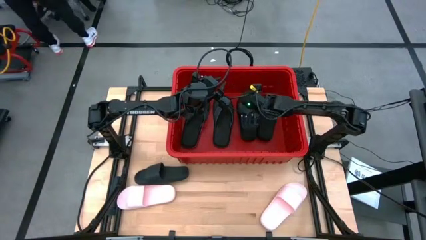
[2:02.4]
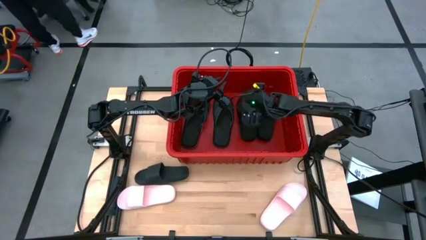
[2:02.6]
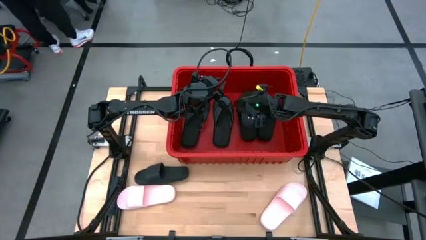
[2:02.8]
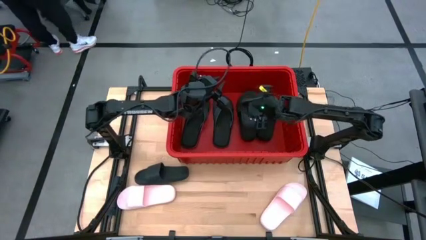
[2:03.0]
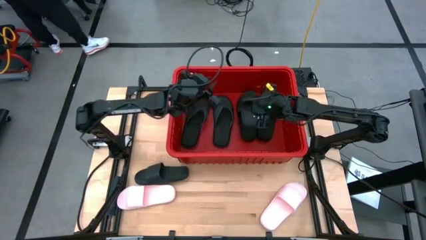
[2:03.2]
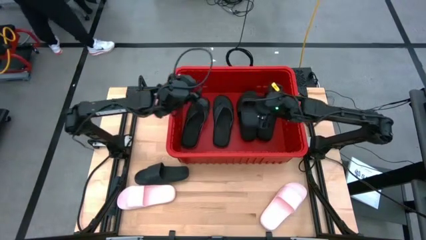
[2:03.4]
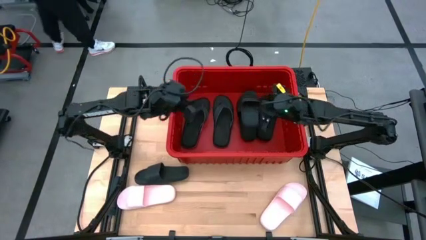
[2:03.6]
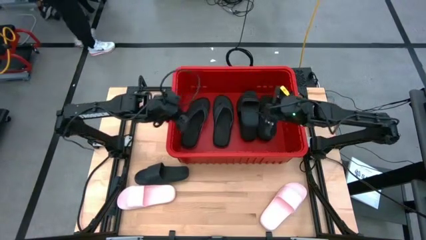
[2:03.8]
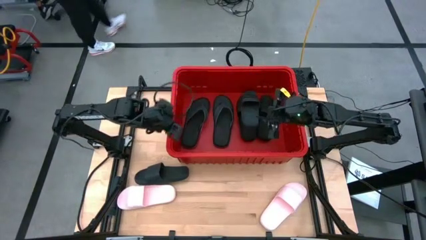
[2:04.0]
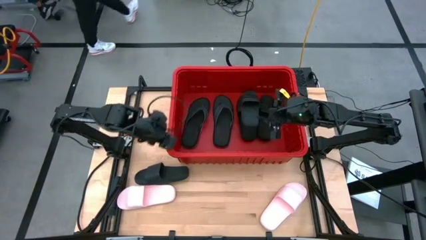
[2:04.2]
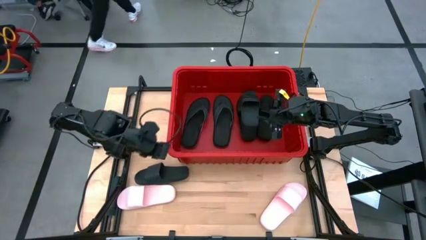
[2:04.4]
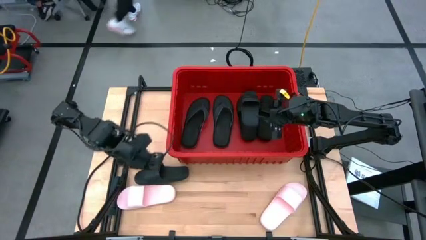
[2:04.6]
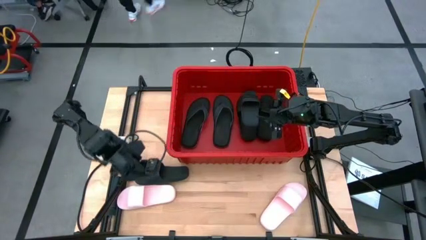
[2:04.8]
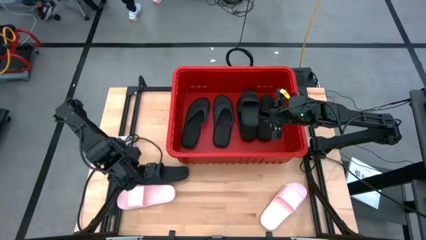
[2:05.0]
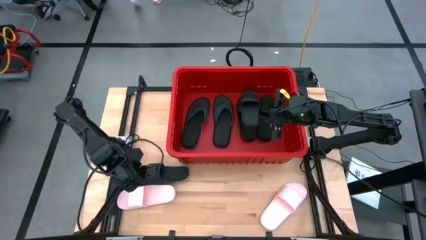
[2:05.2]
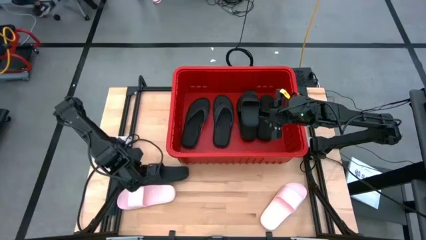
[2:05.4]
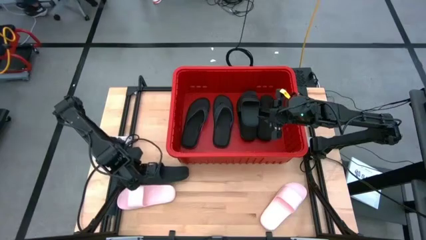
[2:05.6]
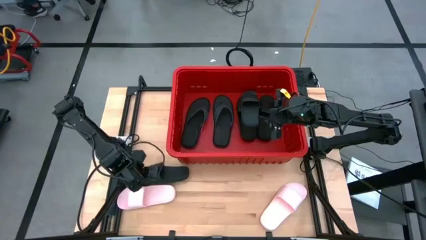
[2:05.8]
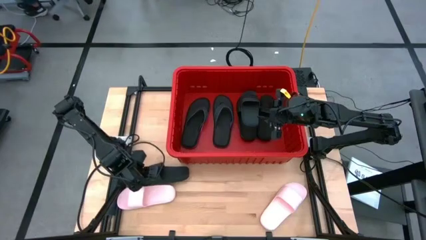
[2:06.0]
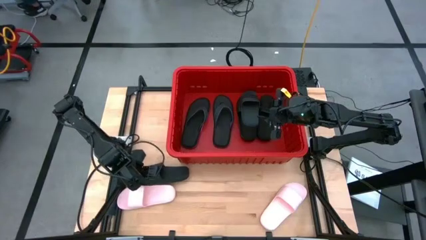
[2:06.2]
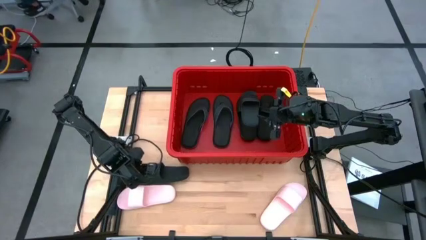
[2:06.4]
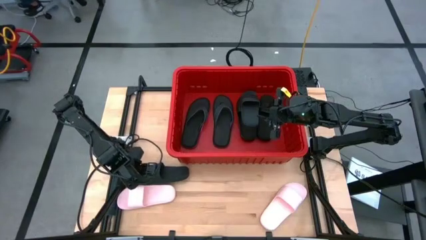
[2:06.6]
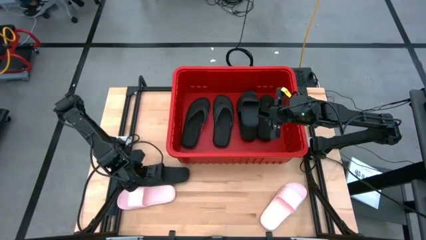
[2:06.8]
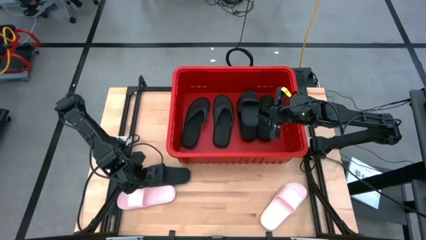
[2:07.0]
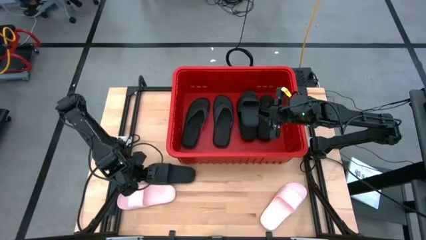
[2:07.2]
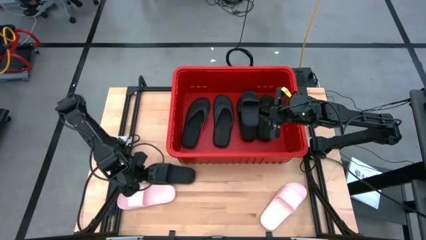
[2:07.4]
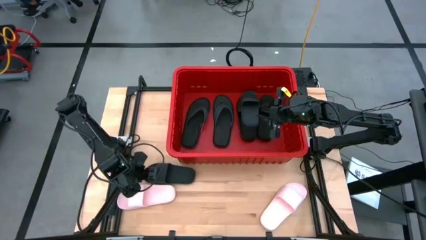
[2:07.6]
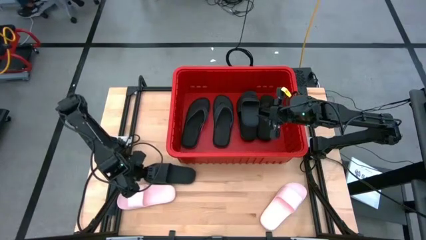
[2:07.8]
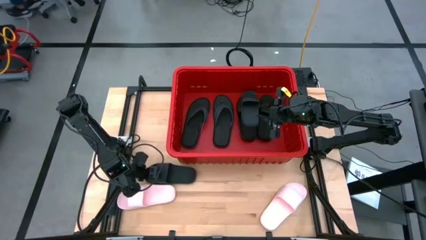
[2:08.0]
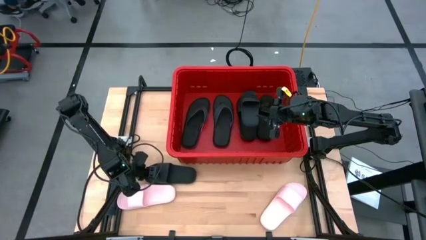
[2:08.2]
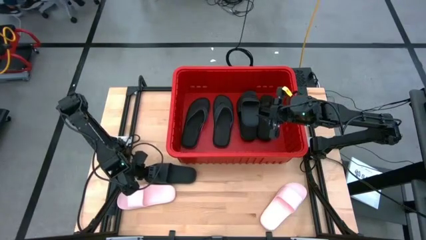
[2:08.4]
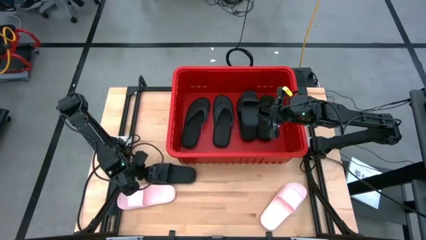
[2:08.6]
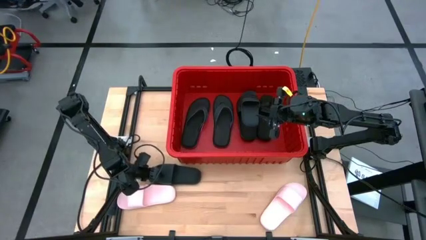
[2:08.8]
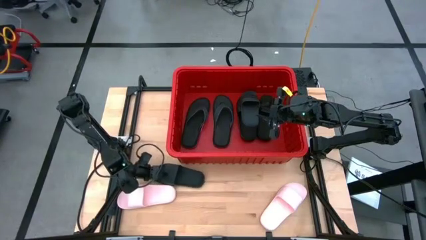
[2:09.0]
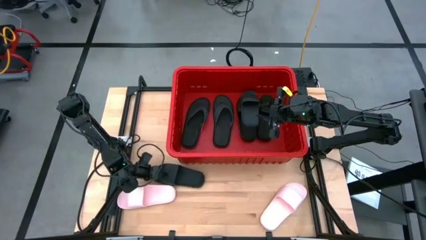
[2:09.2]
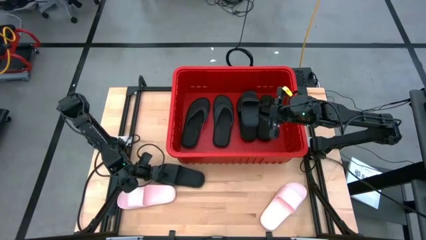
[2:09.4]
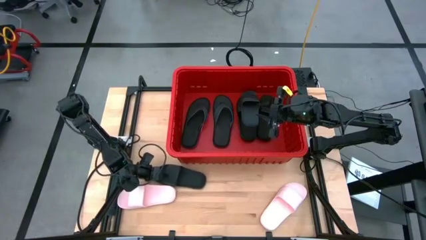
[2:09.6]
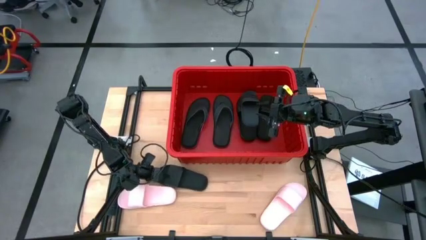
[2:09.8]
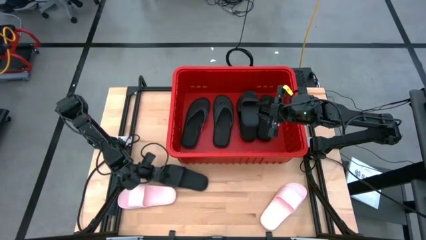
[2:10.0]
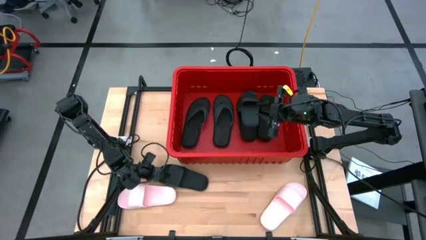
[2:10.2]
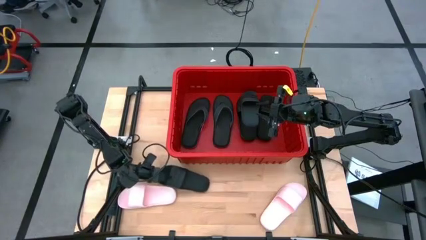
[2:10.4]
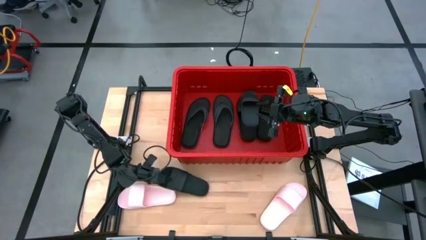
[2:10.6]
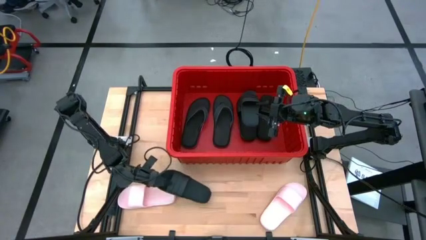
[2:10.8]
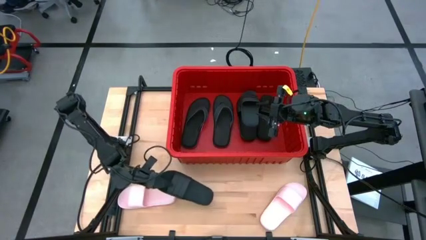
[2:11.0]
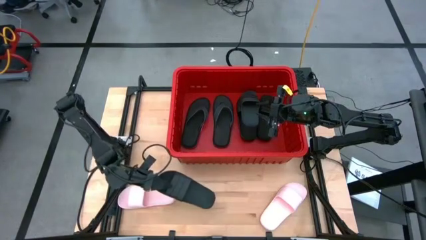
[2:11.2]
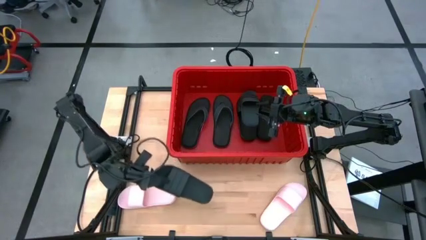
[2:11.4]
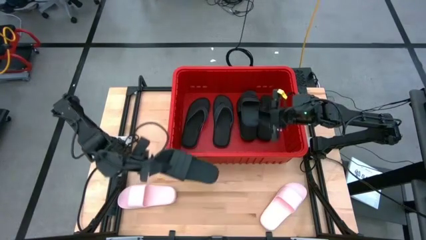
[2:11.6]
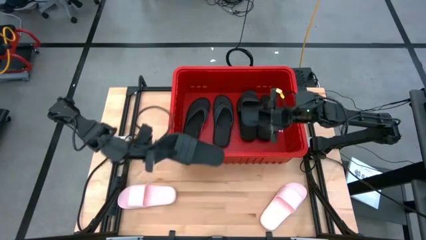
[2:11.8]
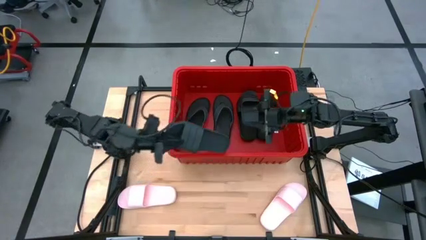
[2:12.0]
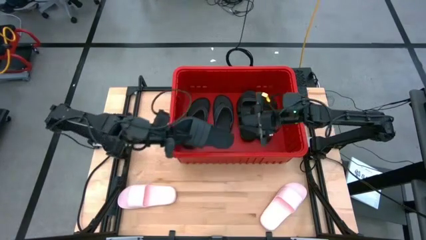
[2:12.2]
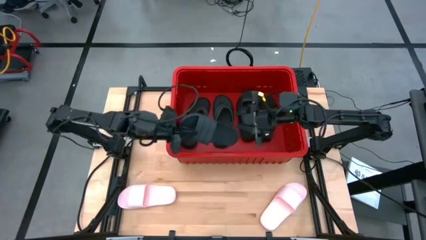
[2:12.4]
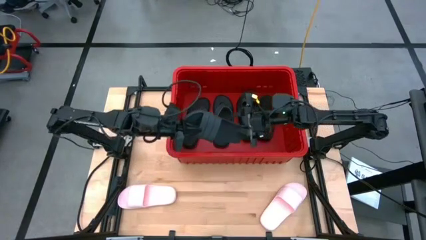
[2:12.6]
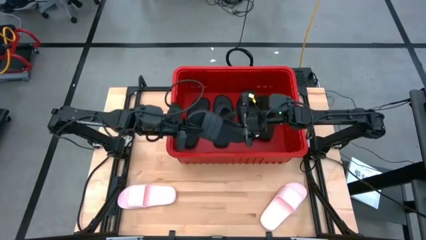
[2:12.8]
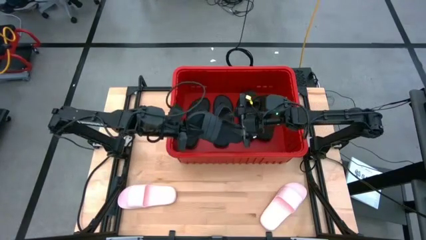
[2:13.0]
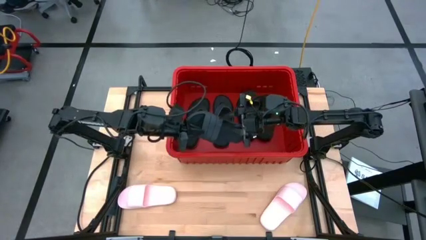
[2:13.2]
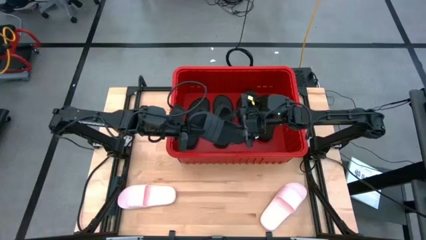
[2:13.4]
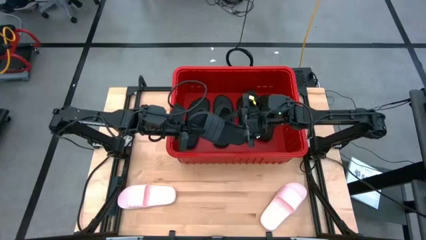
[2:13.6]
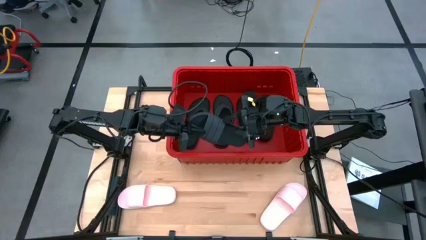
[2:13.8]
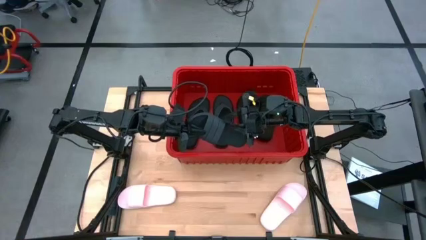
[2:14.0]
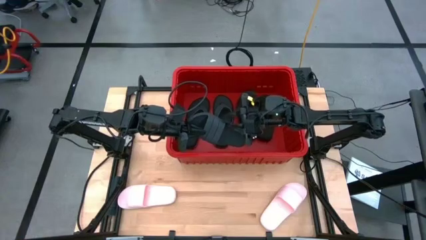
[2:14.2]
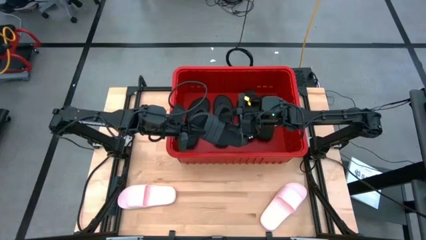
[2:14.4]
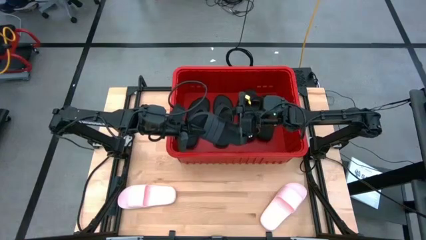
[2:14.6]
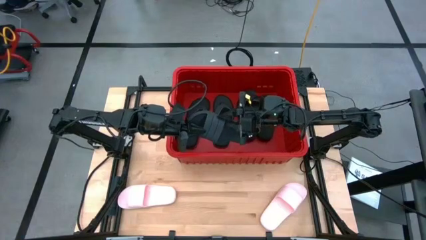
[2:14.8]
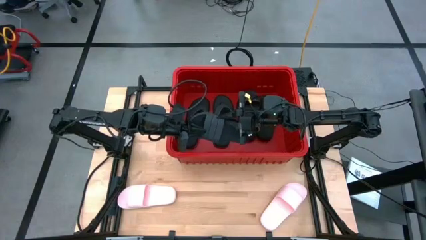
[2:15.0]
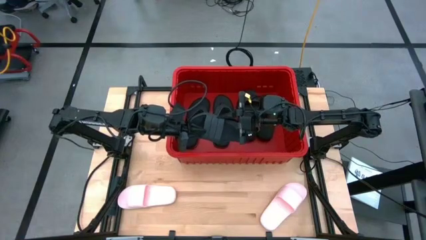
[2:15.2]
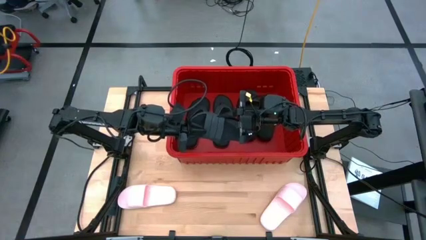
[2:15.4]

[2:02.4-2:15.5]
Task: Pick and place slides into bin
Put the black slide into the red bin

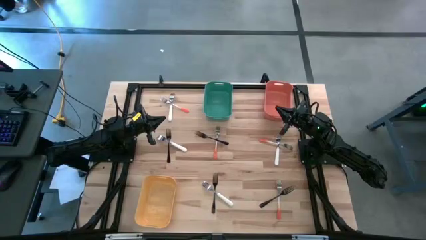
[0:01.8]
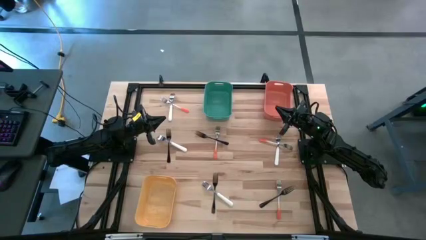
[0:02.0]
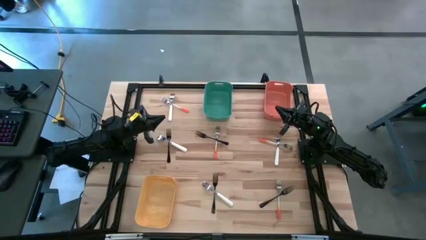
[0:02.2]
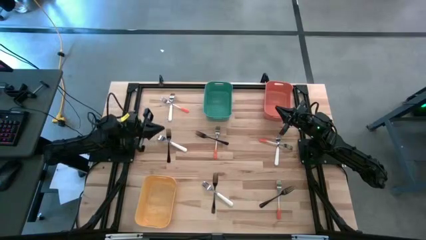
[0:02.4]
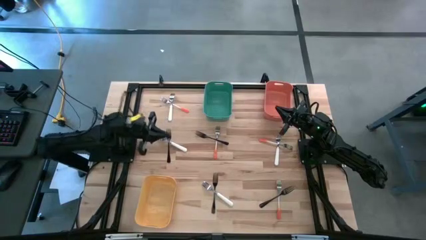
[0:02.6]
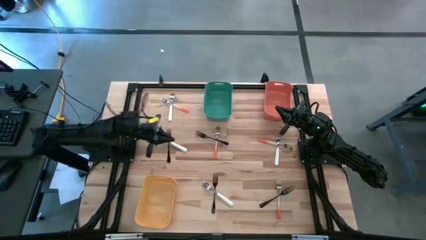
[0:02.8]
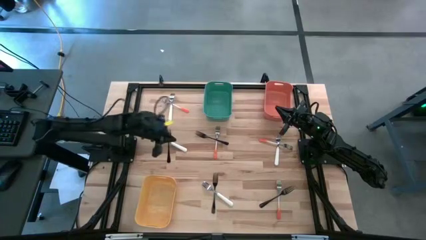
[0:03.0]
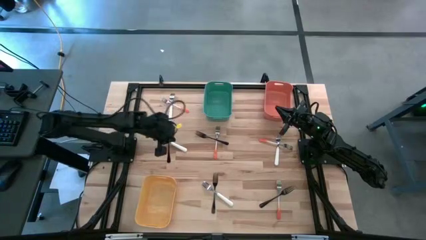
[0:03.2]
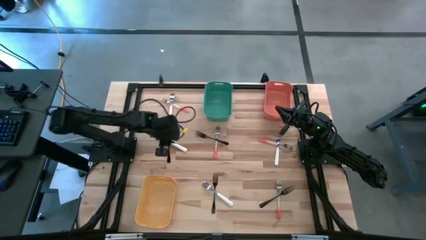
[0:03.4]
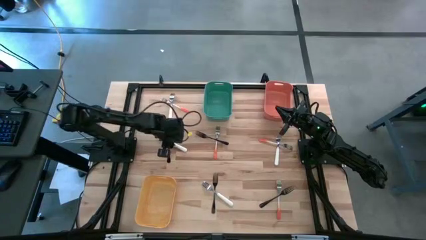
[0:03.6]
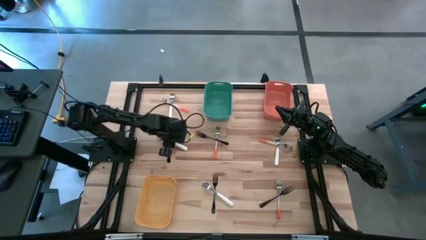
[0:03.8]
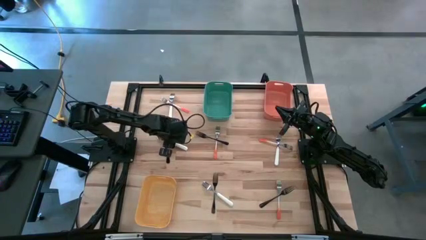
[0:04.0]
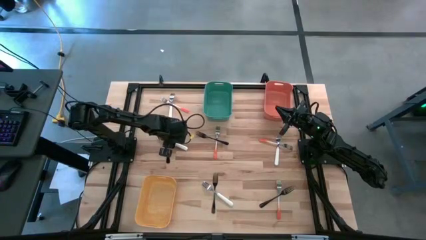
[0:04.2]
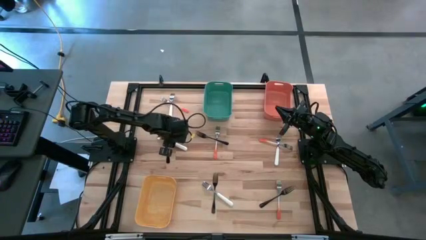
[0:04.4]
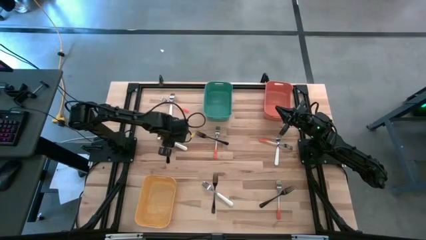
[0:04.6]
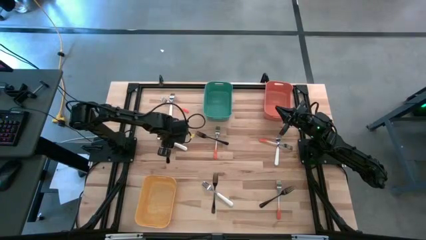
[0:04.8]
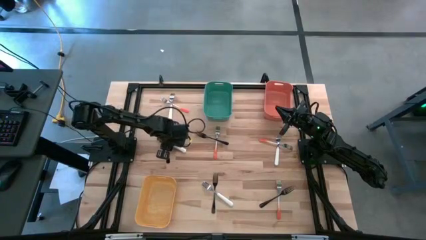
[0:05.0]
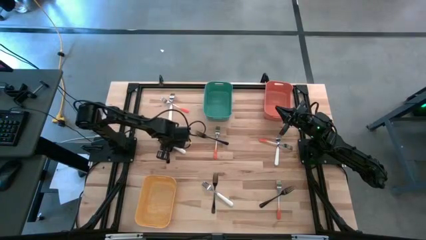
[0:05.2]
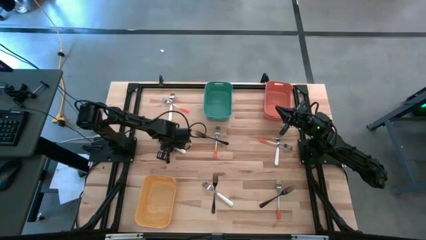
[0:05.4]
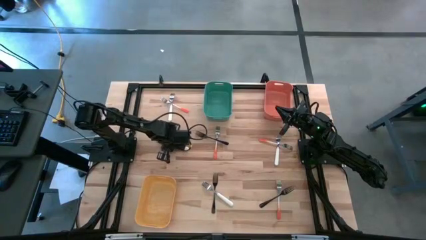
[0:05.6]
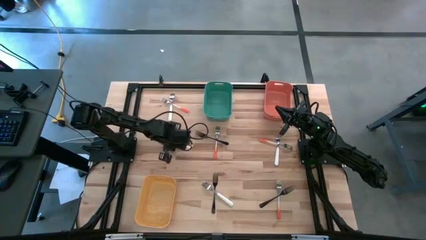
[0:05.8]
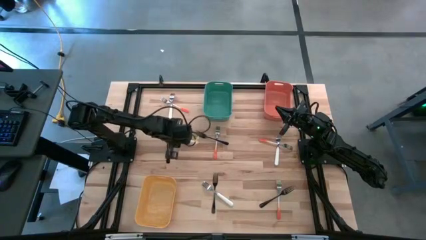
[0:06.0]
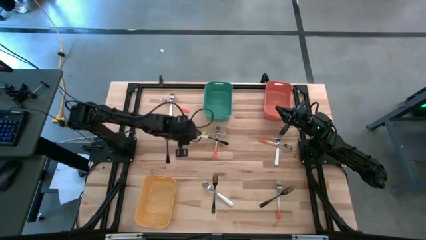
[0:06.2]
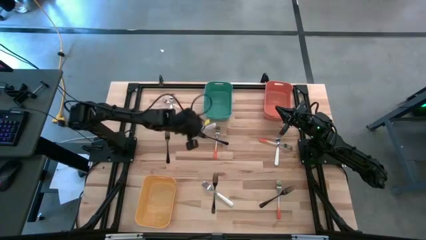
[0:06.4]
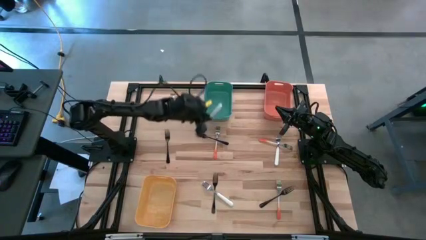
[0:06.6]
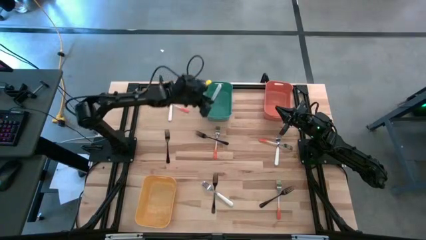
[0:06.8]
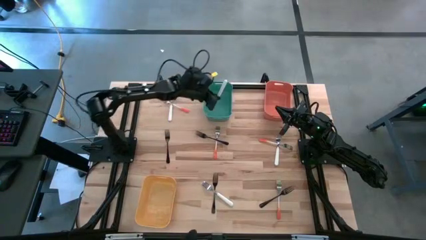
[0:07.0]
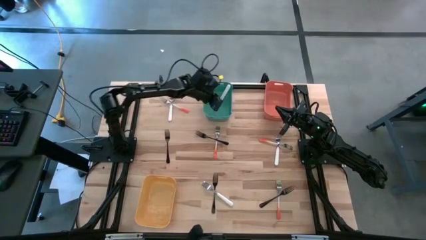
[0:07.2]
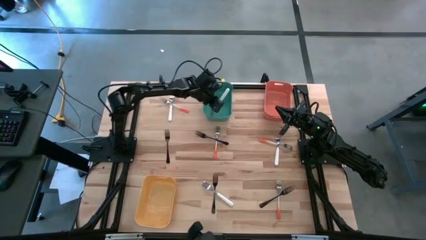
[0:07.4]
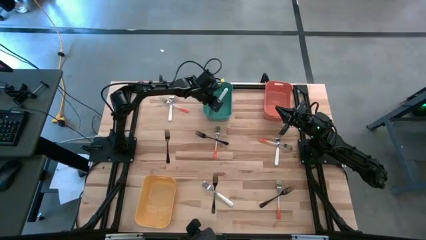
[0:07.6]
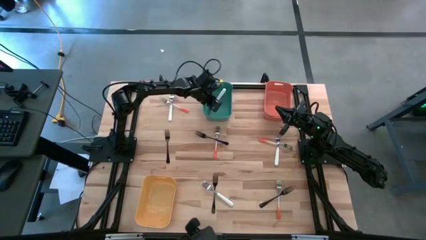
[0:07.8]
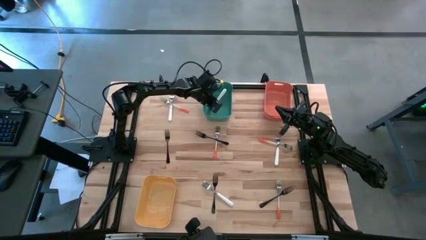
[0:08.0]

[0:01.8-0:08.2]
Task: Sort silverware by color (type)
Put the white fork into the green bin
